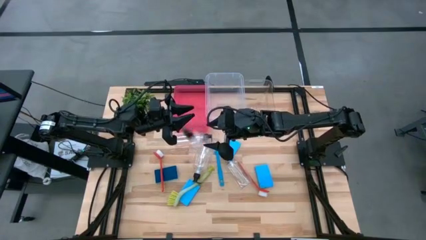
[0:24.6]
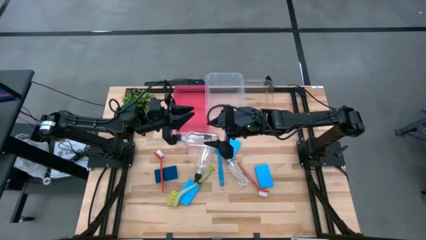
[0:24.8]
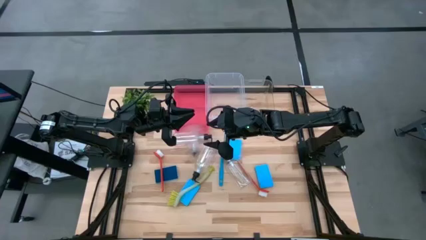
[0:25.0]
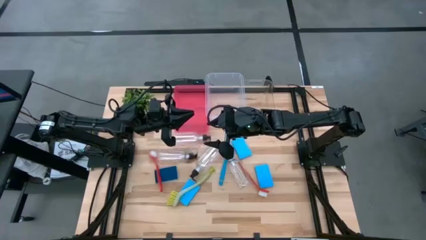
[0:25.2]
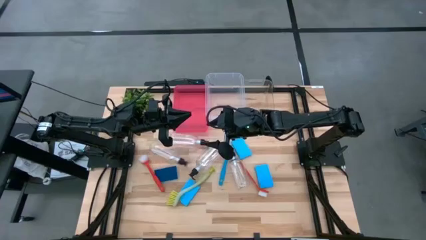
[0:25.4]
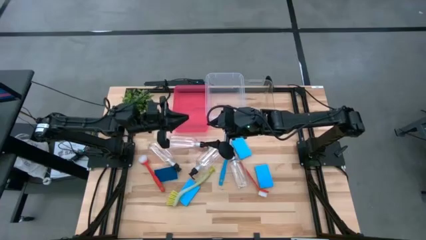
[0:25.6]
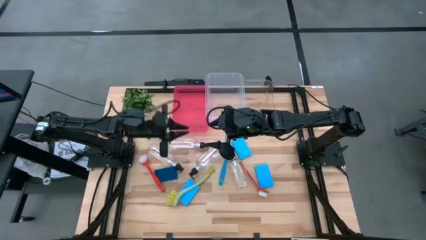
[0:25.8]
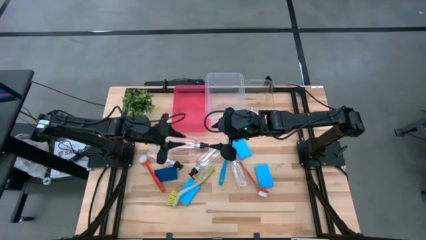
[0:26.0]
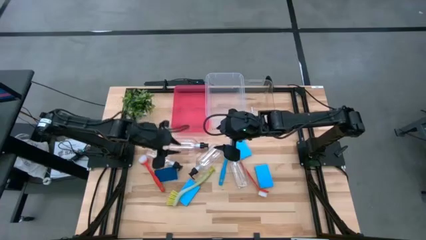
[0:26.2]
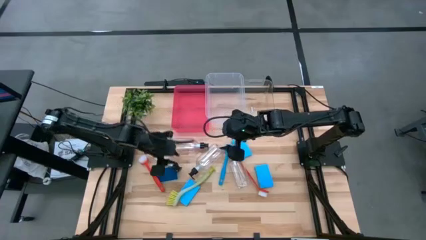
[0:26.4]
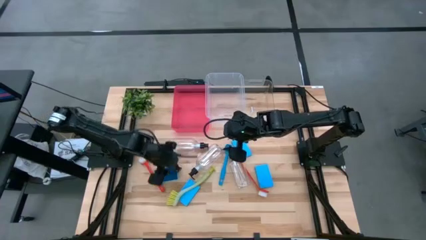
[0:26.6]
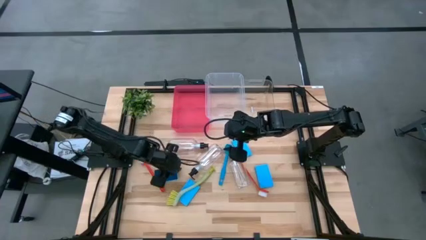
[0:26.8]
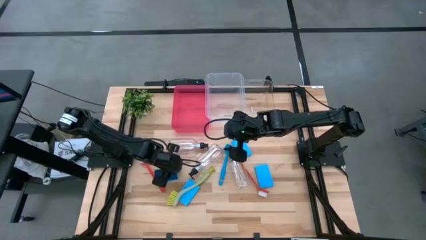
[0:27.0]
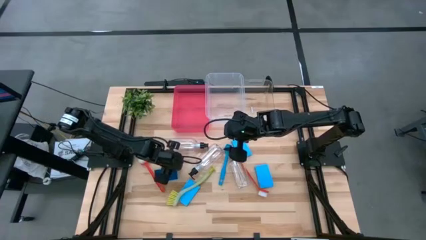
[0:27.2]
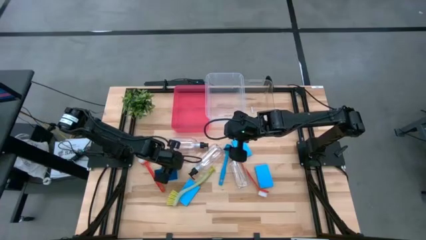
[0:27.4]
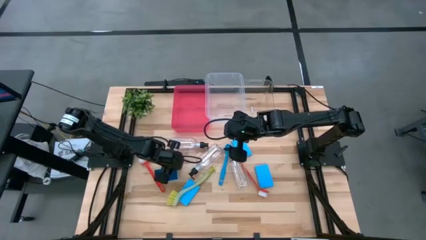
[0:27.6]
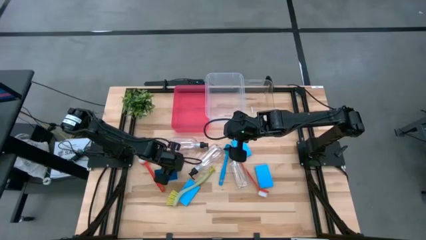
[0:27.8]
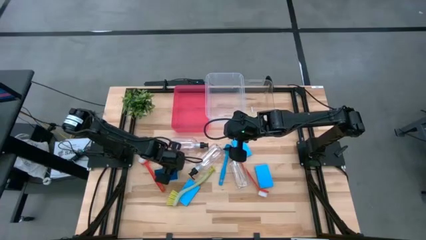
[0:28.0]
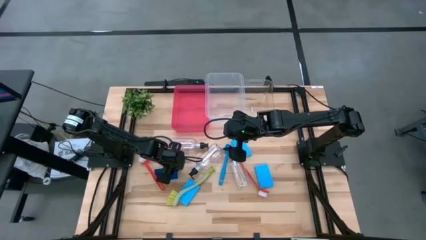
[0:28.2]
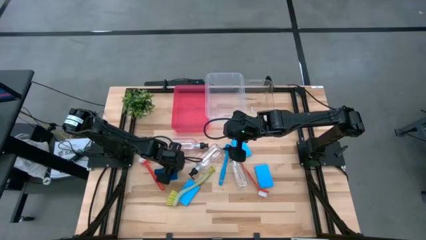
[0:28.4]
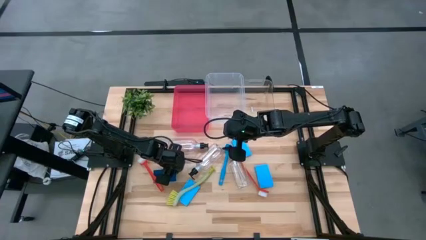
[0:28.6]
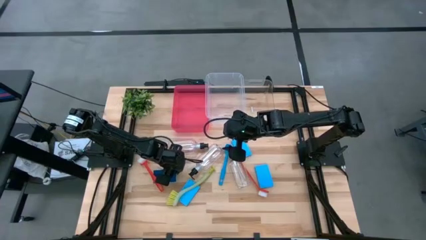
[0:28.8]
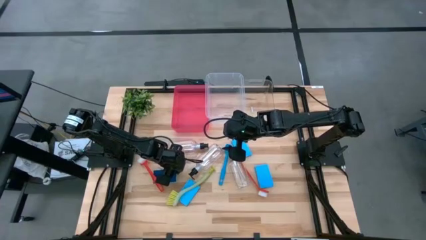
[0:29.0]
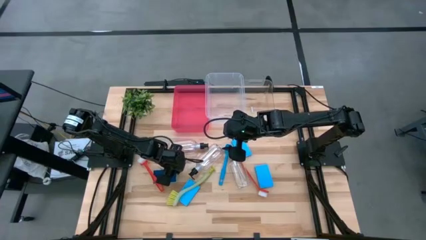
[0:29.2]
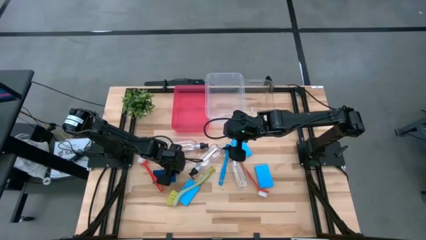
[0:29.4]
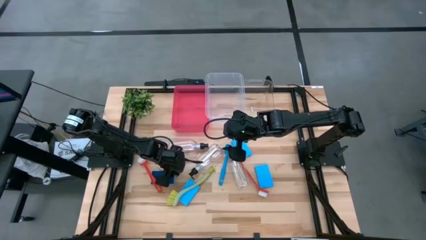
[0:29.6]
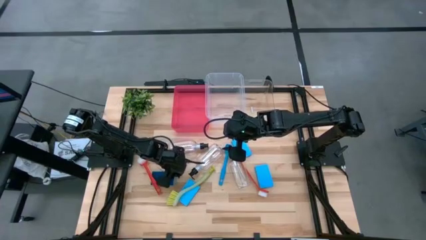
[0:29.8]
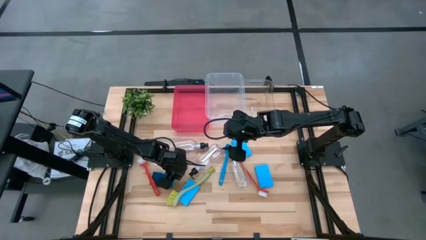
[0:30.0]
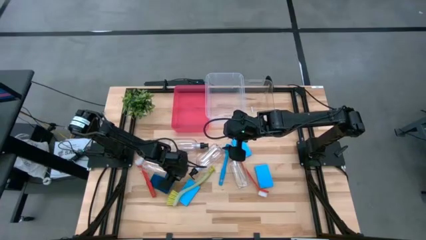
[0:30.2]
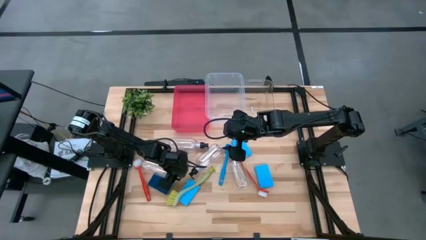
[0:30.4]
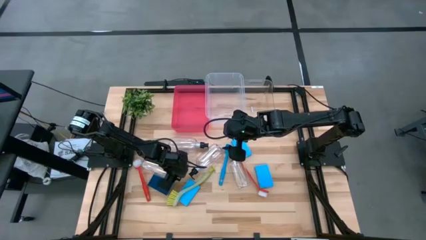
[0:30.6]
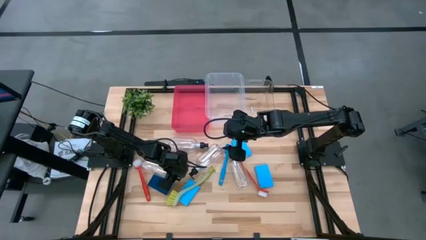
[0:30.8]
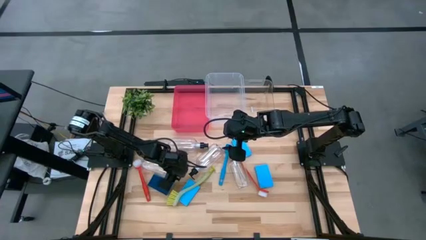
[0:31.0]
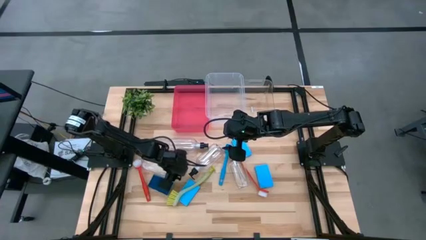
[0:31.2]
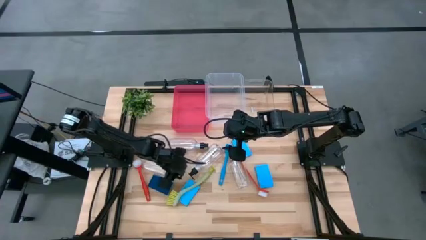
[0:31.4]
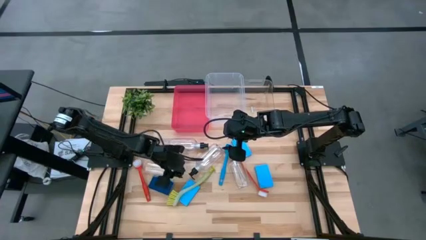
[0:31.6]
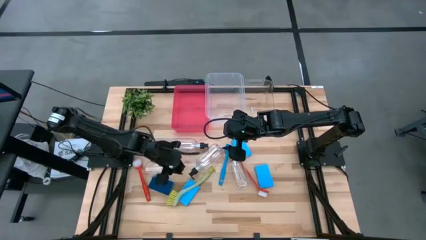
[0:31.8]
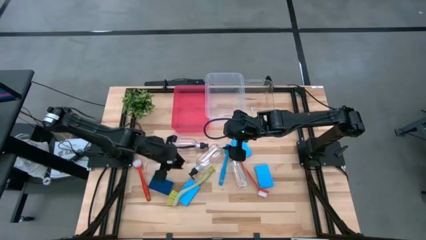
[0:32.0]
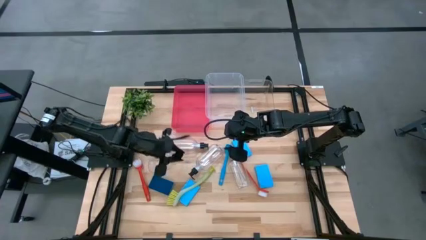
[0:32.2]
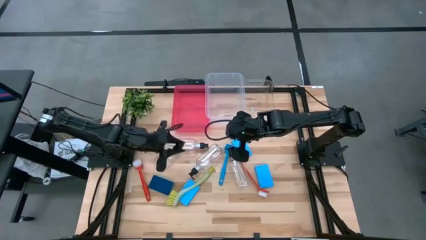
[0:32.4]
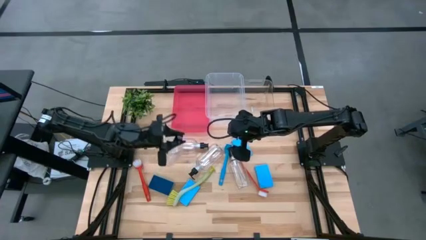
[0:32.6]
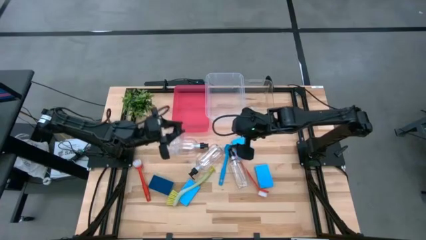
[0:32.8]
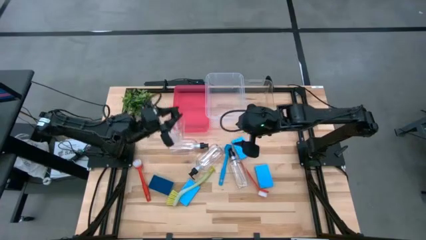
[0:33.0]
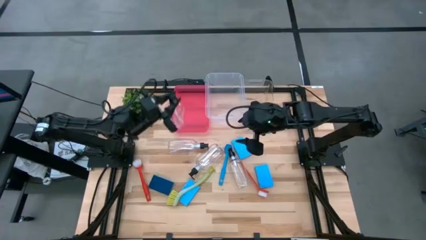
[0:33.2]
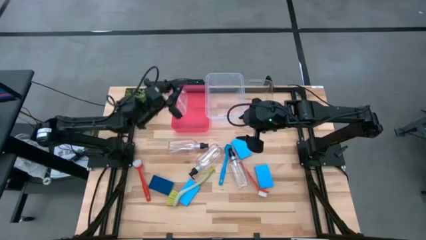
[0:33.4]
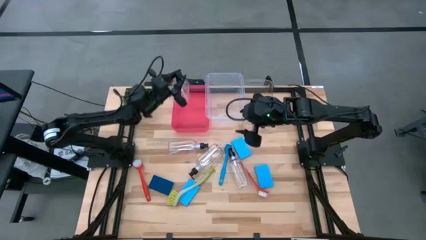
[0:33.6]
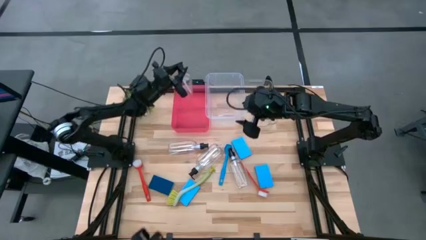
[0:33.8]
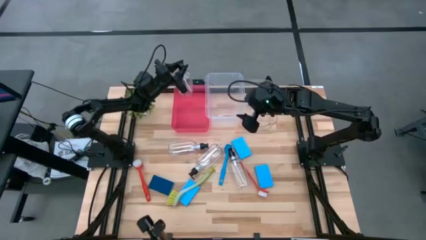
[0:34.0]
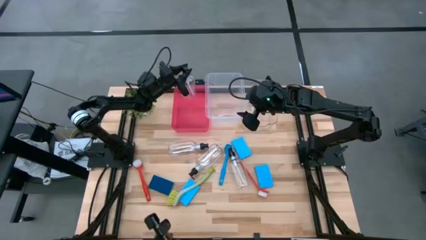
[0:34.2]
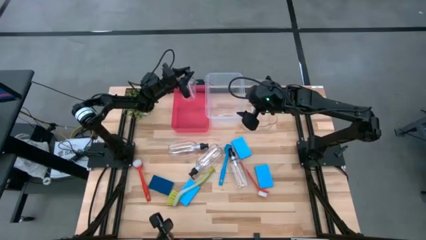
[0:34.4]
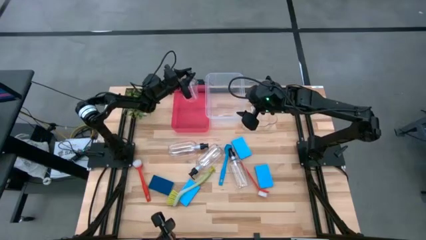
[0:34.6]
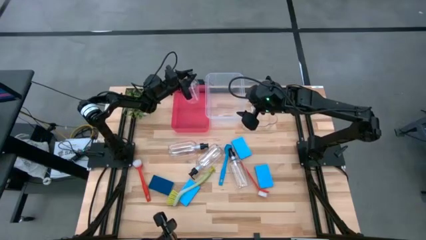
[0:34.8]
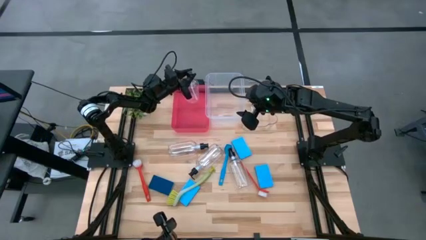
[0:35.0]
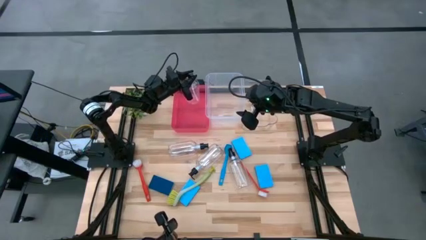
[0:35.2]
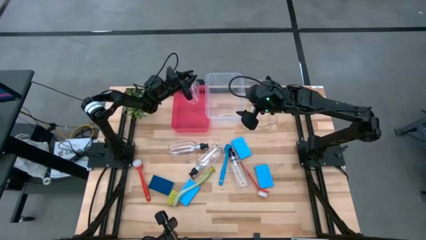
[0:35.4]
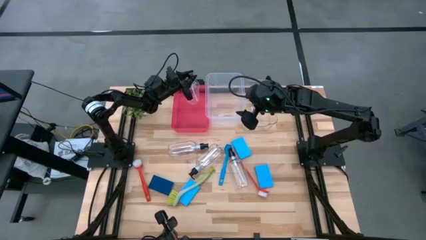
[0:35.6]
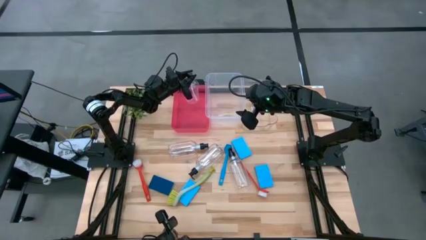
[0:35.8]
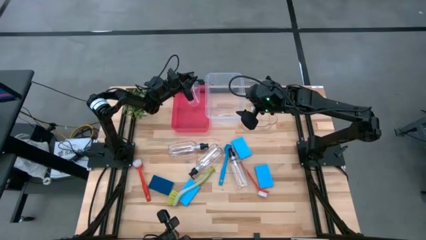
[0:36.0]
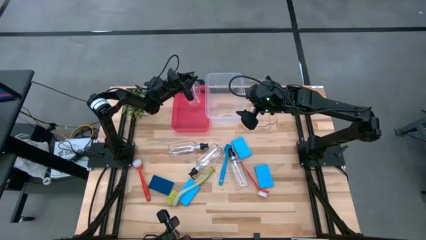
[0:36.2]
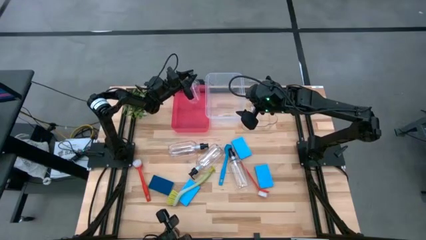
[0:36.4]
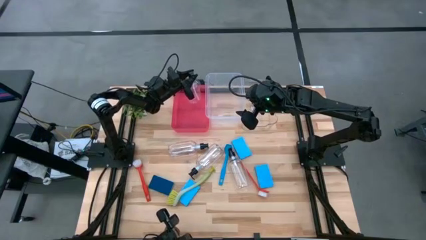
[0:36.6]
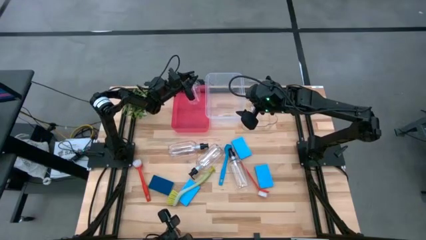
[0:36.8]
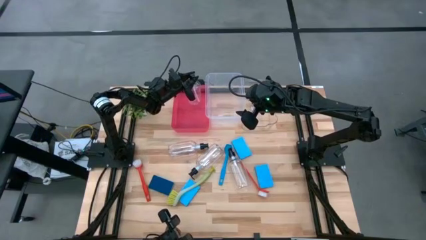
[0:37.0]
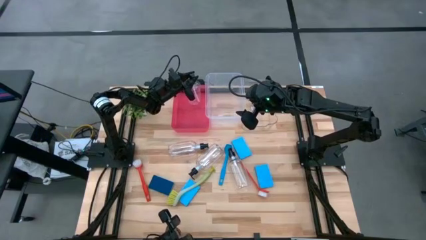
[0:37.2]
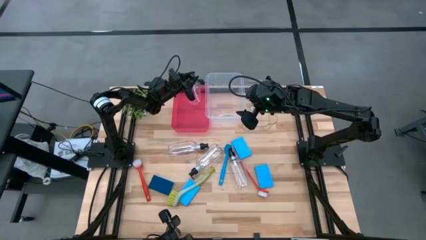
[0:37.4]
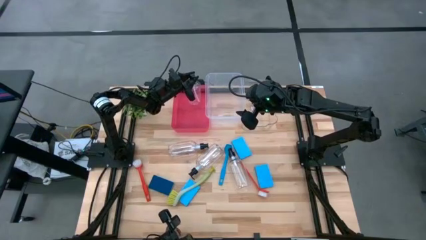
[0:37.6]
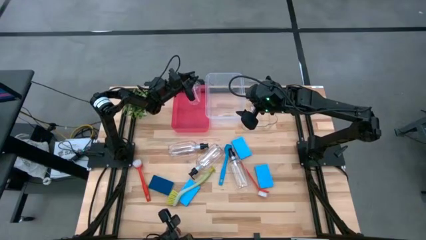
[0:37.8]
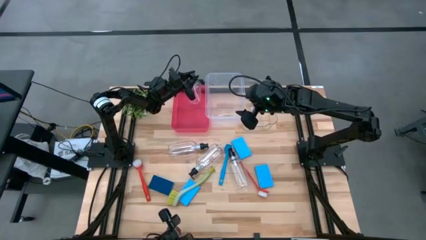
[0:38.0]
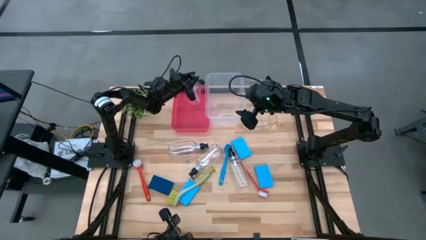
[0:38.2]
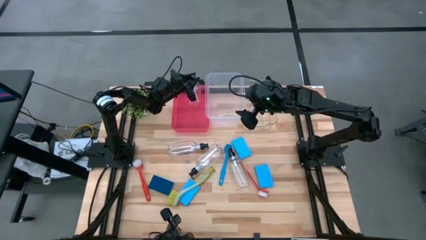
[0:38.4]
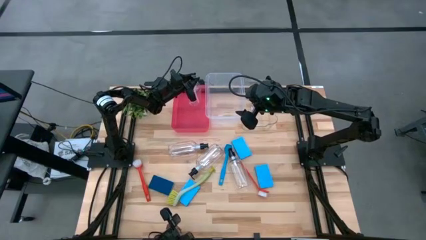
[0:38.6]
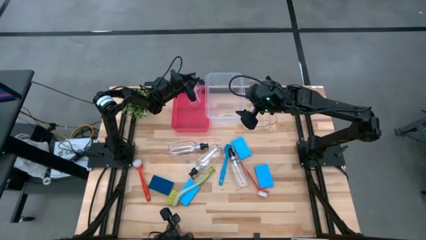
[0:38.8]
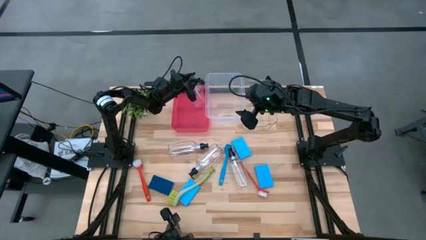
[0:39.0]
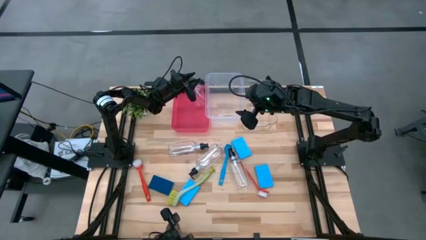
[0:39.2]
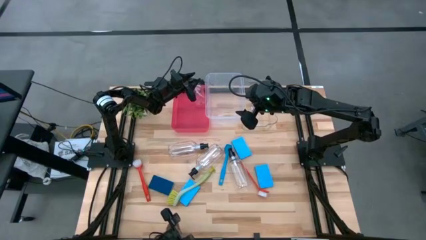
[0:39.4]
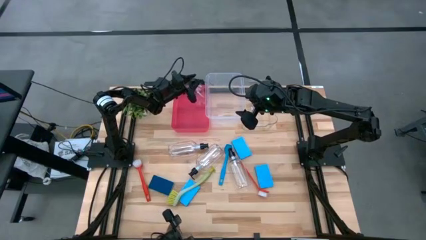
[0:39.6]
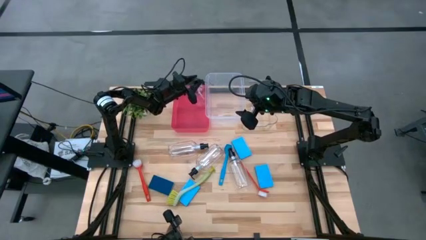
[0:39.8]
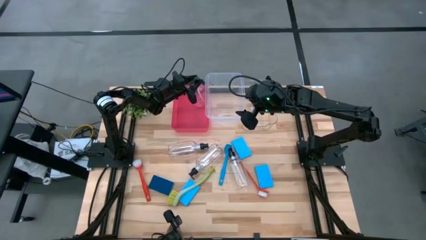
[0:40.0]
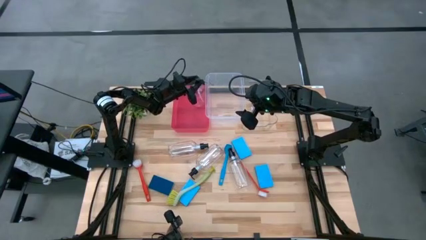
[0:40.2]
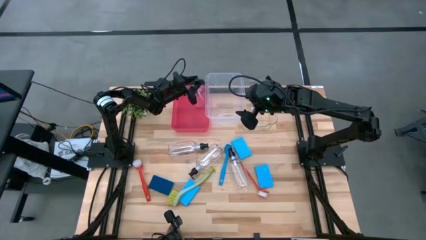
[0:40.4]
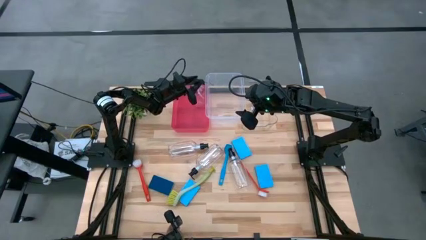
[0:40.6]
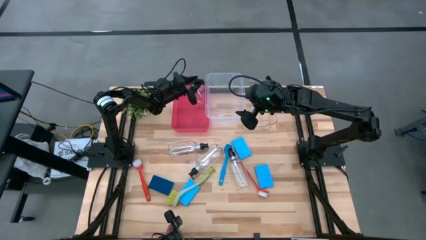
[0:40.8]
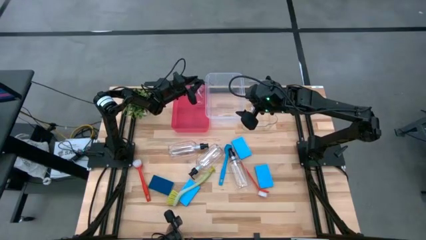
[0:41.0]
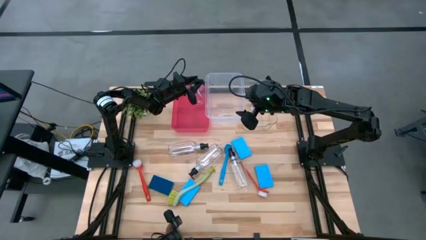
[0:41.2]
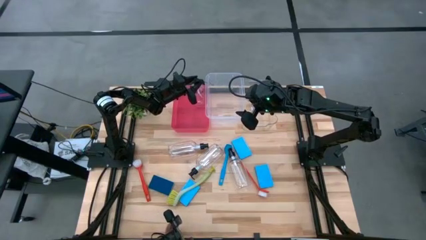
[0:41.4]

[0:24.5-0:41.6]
Task: Pick & Place Kitchen Sink Supplies
Put the top right transparent dishwashing liquid dispenser into the red bin
